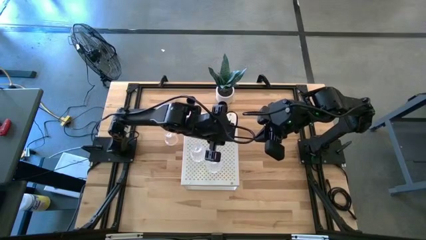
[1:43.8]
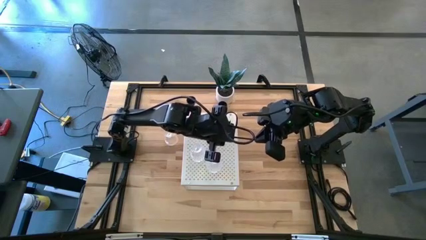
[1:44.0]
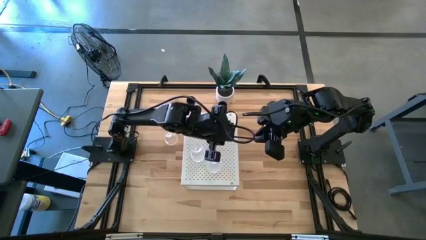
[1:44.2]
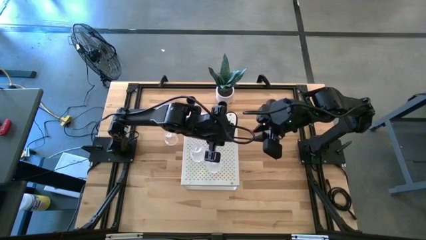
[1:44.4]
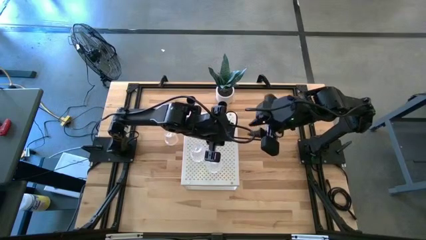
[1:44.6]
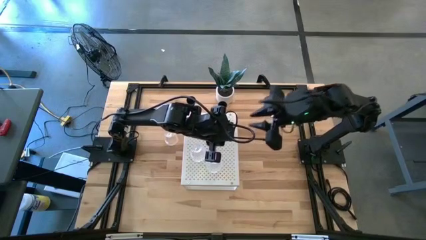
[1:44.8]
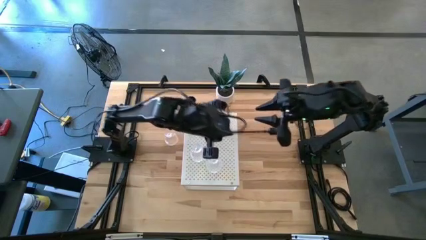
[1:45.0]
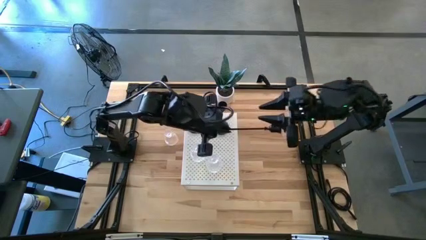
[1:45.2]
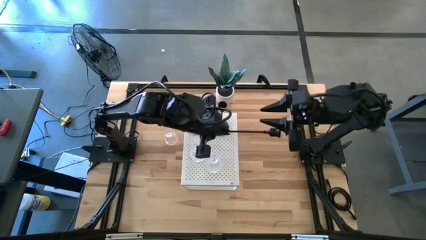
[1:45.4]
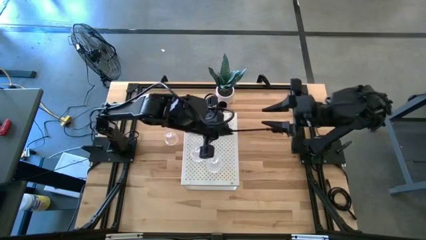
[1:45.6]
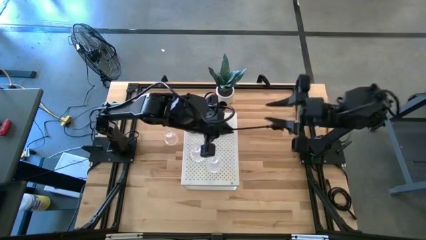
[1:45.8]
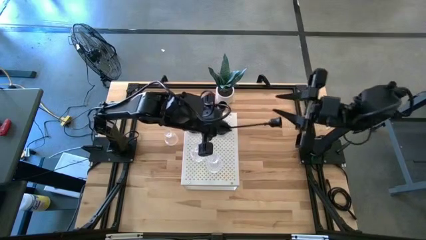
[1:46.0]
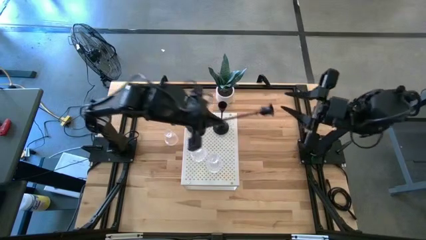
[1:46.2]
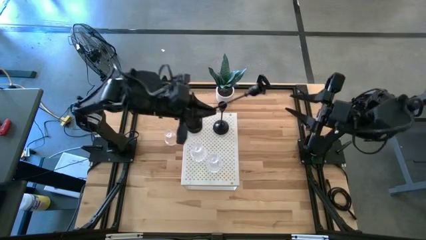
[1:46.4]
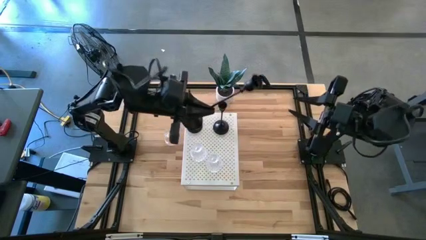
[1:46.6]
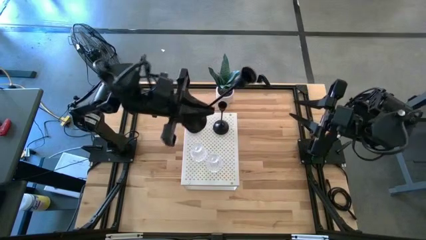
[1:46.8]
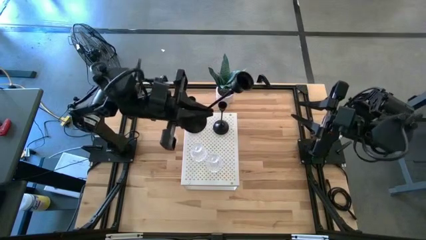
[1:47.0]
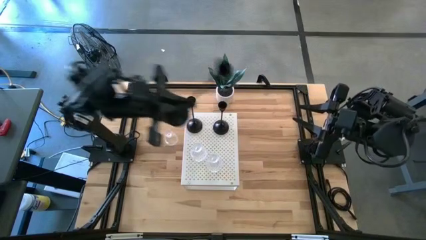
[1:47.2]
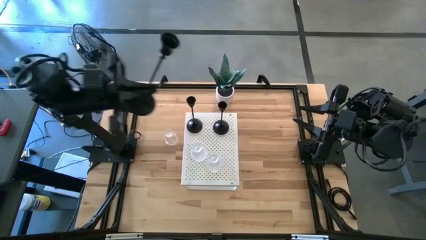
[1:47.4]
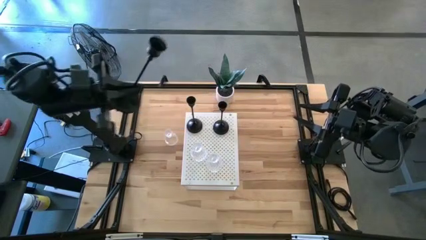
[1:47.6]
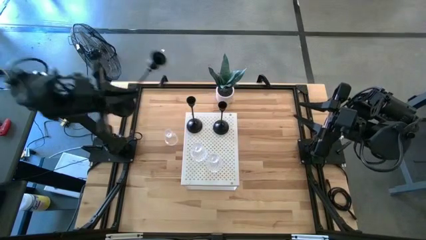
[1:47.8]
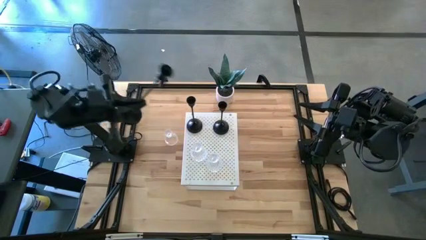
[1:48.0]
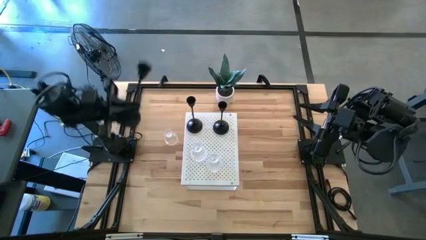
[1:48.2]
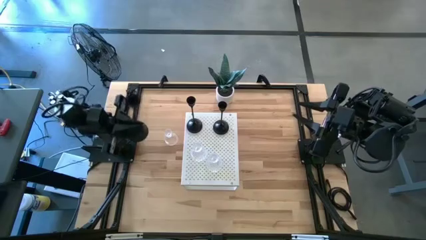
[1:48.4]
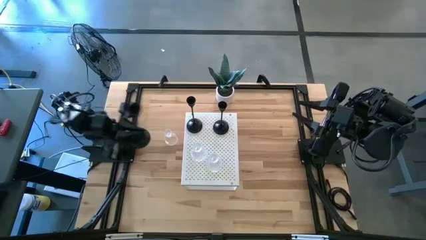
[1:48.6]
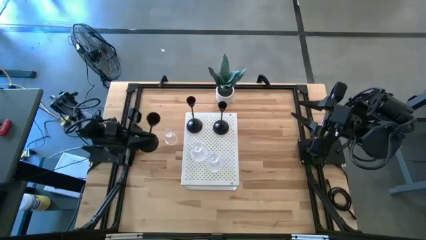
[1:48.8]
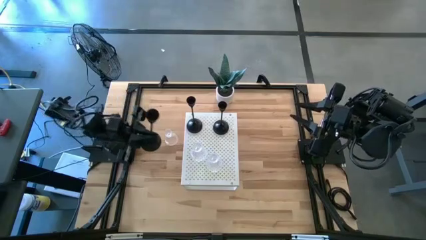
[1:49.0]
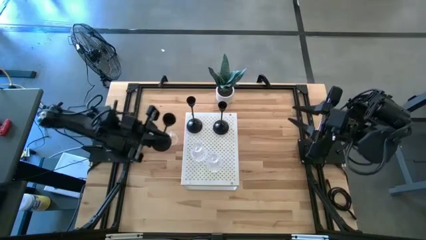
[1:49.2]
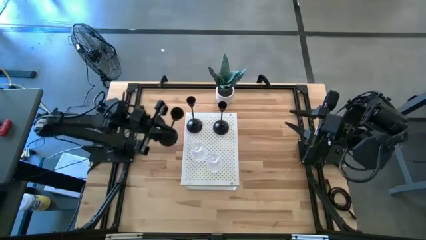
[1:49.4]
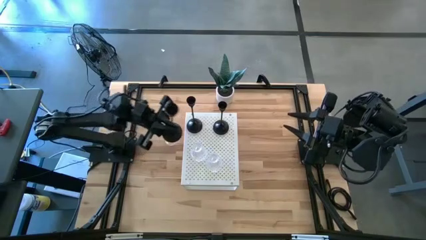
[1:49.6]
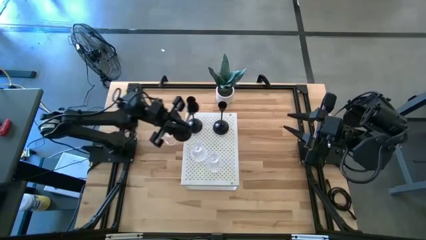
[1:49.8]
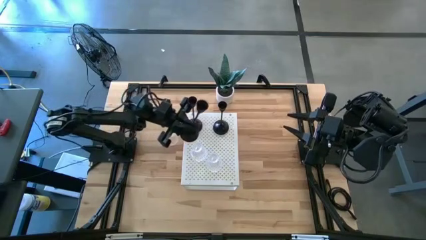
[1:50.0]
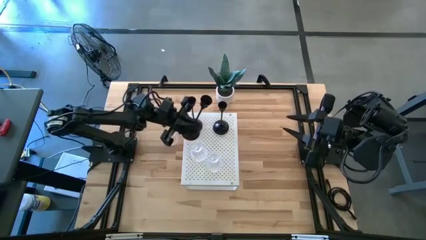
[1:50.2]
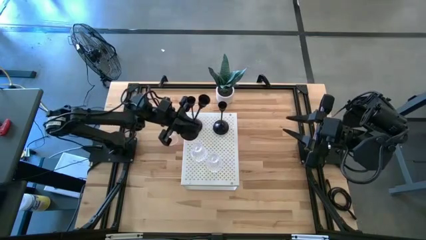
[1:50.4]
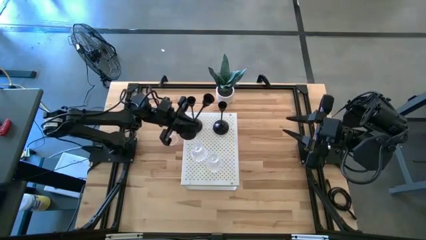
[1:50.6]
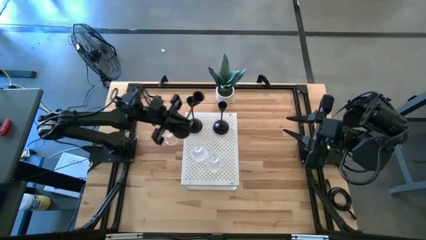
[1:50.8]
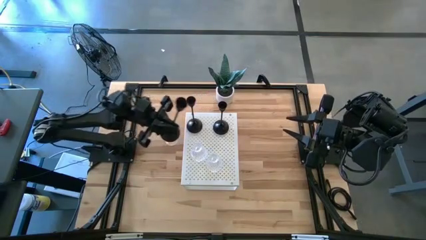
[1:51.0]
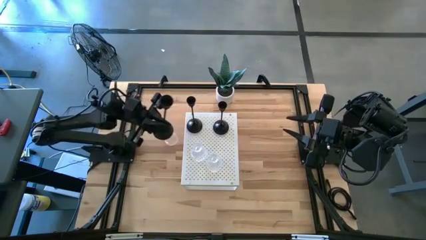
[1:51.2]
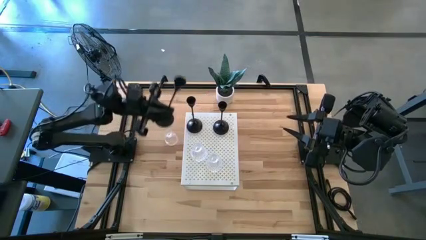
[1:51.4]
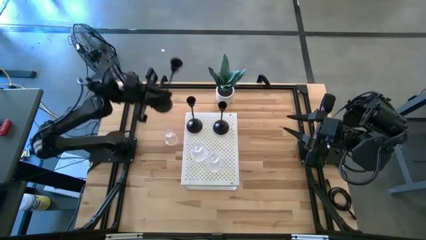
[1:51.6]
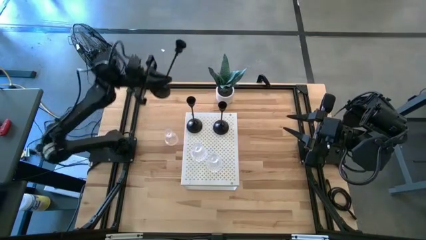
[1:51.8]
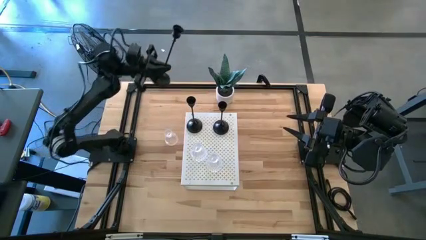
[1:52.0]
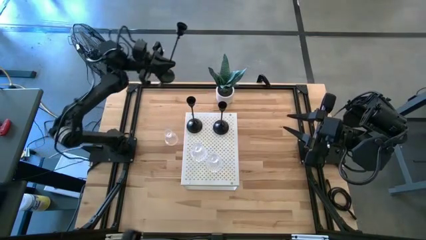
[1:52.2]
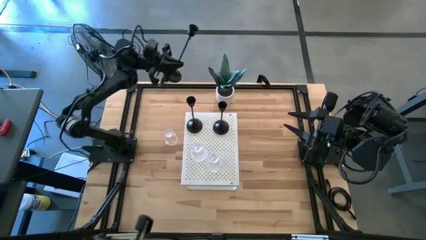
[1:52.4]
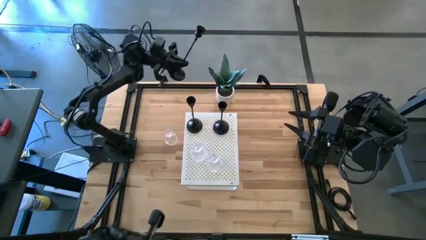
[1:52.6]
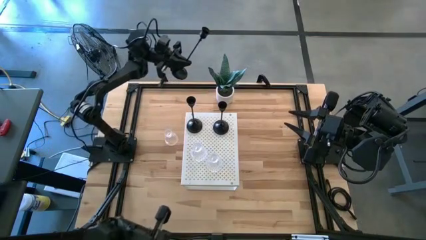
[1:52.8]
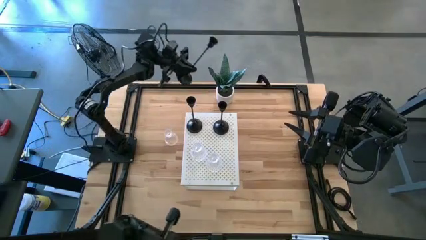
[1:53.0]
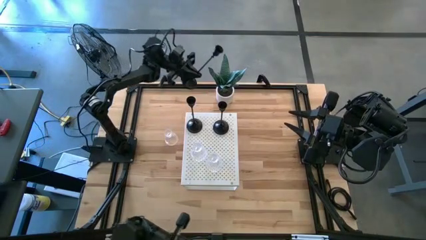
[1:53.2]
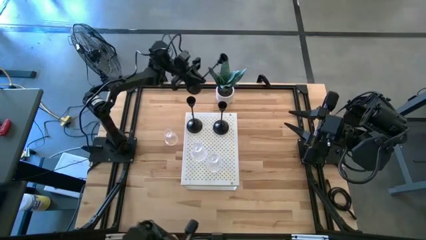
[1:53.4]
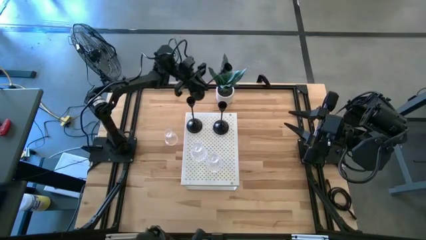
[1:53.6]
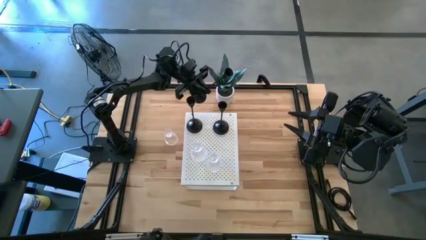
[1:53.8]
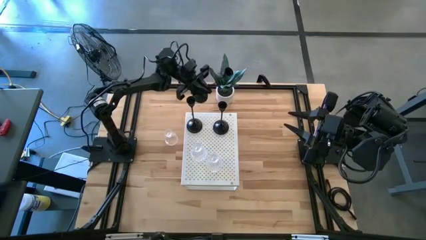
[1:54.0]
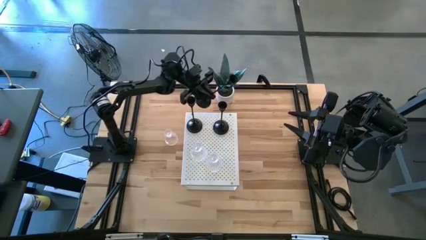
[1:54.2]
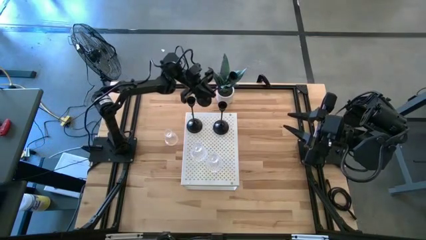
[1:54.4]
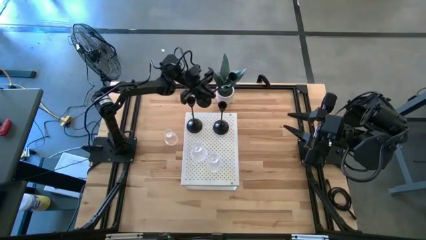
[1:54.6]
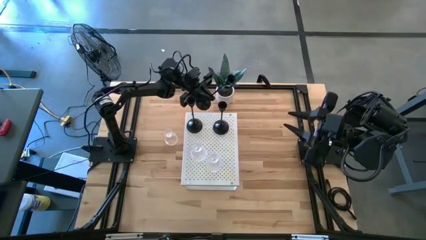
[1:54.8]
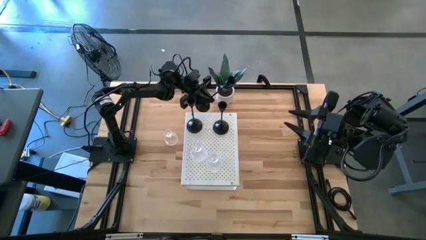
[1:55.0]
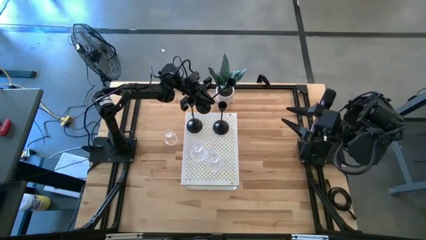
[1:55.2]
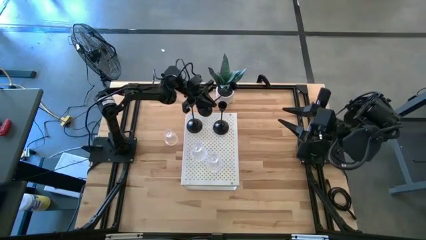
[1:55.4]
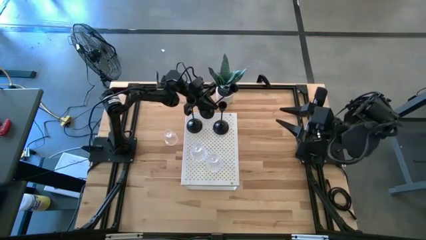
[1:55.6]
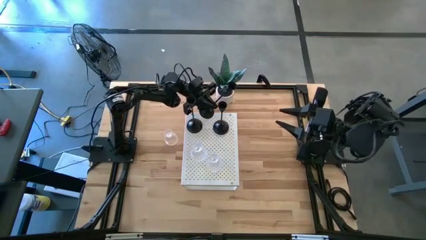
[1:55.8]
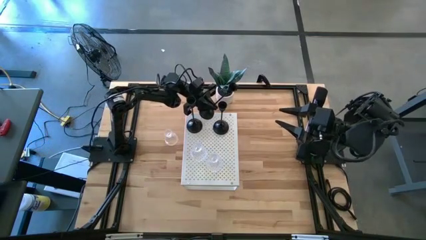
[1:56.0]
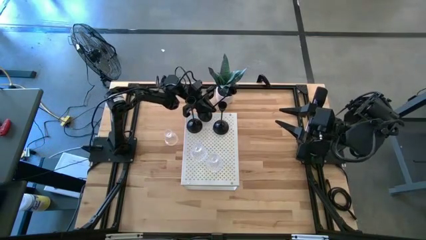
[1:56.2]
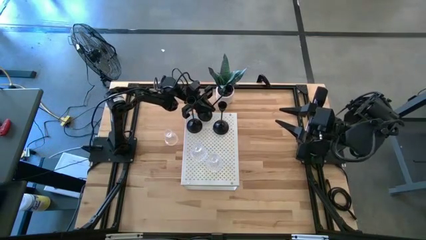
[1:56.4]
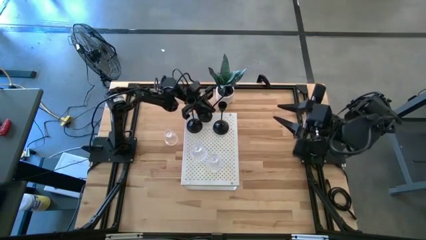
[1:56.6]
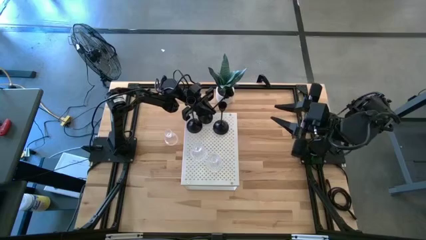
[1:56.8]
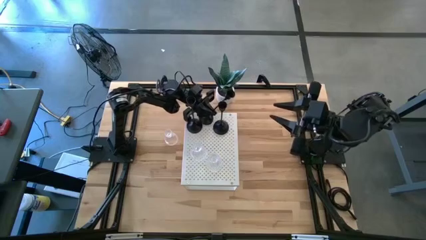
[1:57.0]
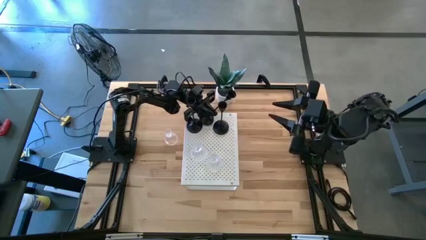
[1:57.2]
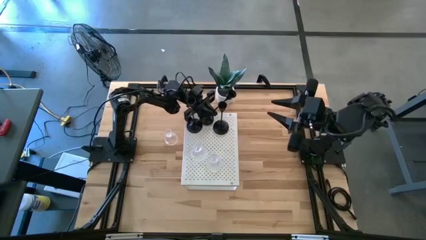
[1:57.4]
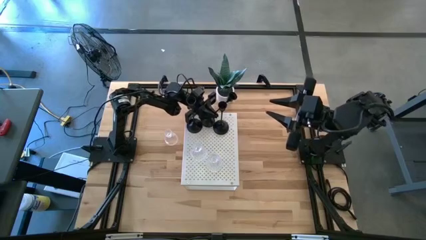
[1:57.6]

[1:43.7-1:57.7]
Task: Pick & Place candle stick holders
Put the black candle holder on the shelf

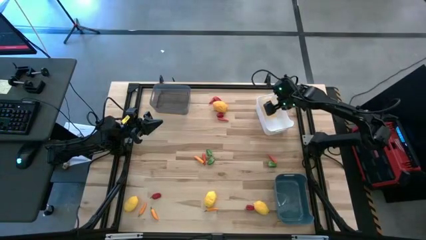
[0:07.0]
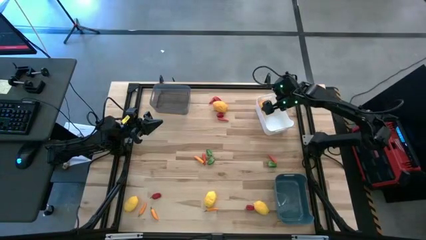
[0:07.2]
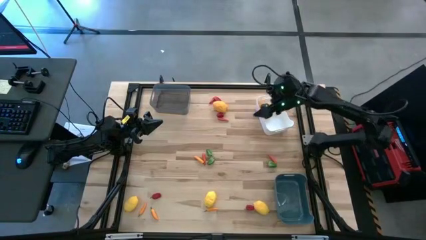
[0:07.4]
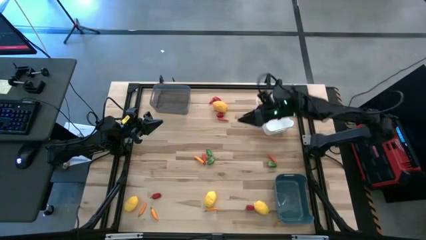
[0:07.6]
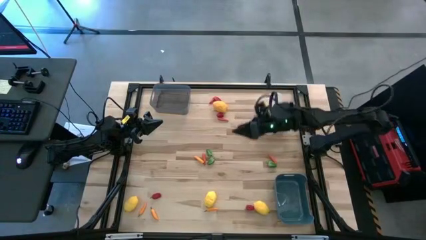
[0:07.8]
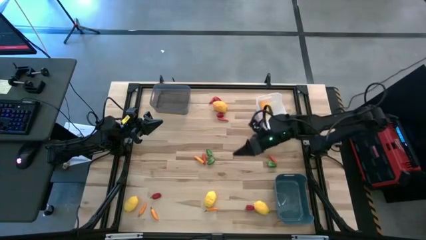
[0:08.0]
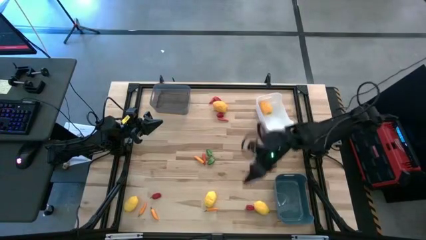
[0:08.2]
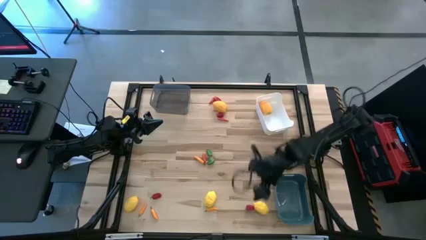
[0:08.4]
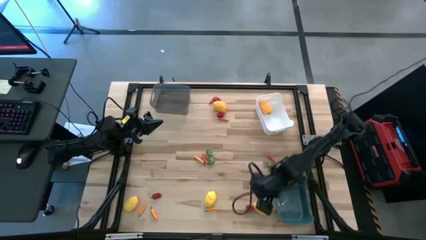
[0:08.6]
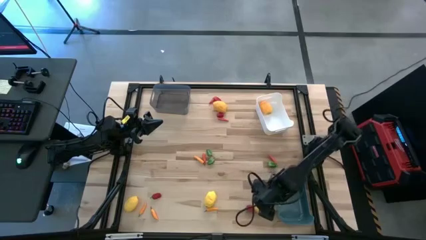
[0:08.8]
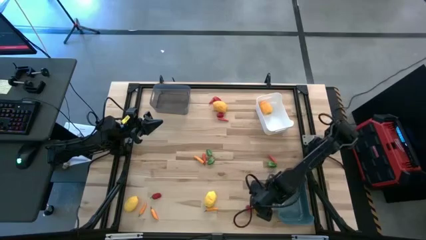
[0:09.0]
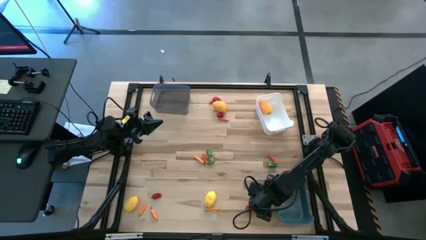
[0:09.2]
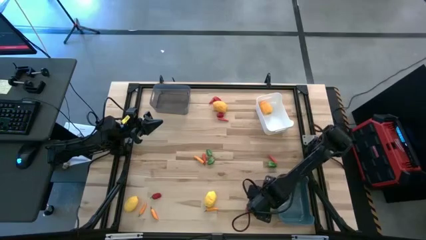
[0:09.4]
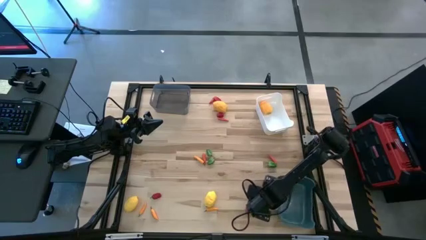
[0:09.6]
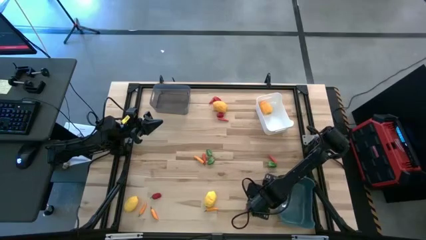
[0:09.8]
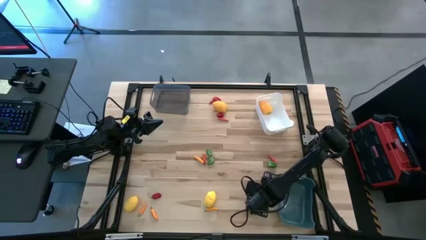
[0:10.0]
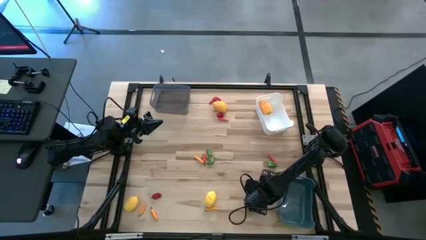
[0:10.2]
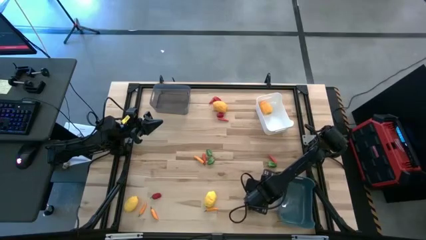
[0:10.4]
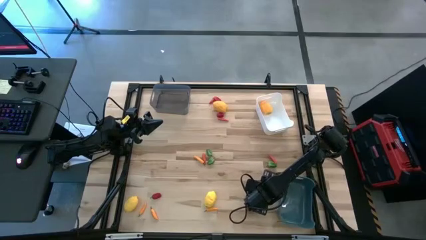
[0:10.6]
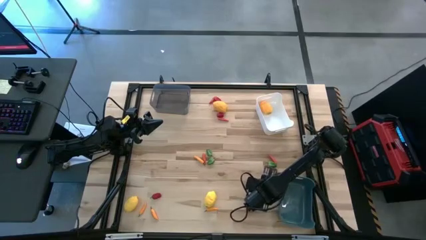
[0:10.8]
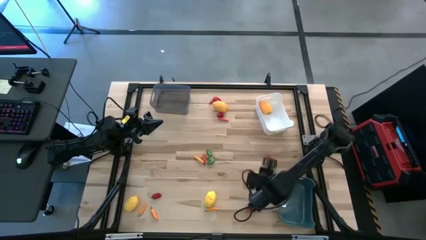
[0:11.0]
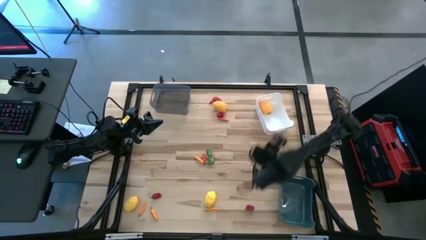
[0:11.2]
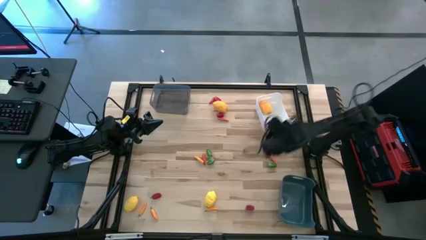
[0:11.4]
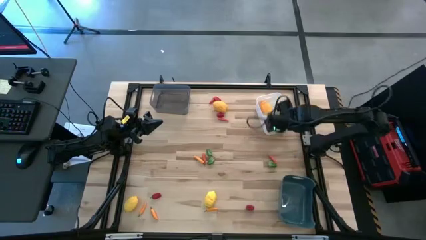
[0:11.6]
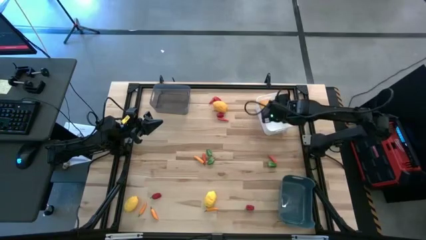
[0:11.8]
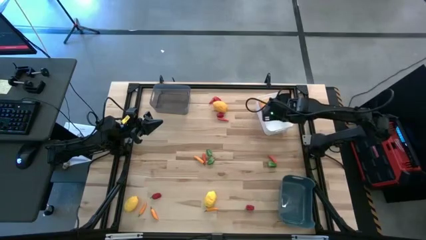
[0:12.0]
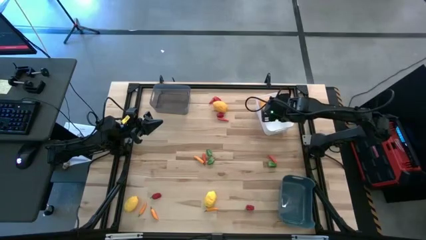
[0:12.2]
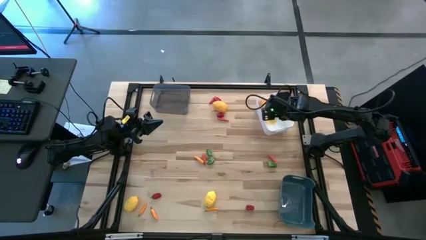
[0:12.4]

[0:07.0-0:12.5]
Task: Sort produce into baskets
Put the lemon into the white bin
